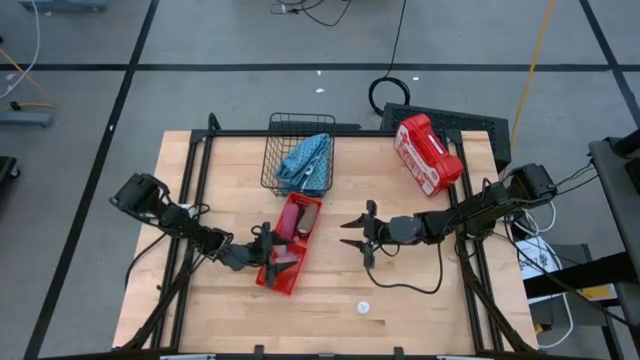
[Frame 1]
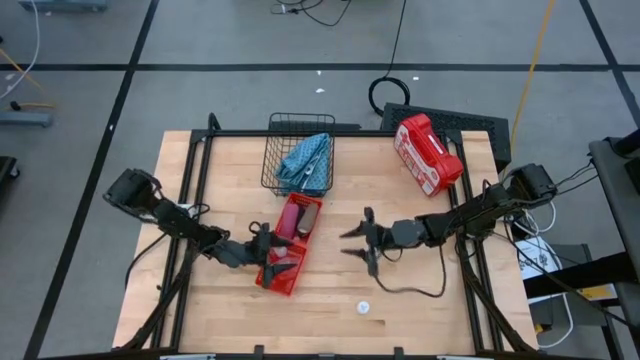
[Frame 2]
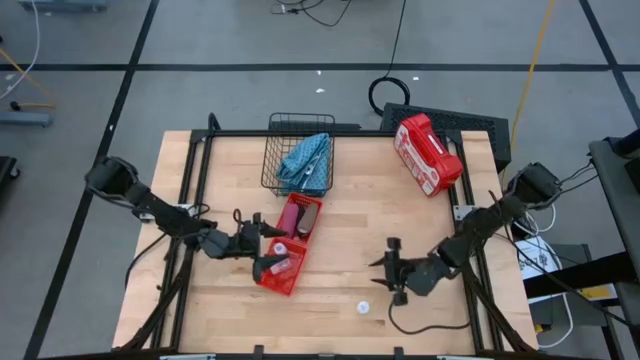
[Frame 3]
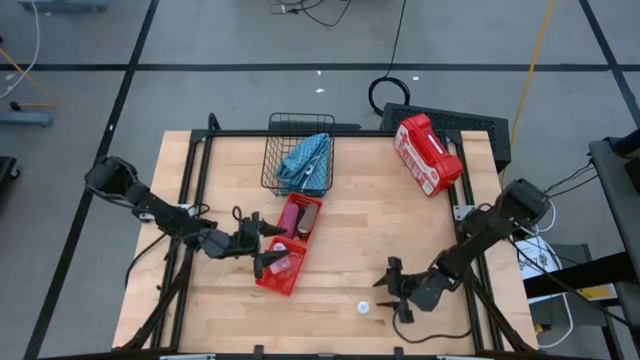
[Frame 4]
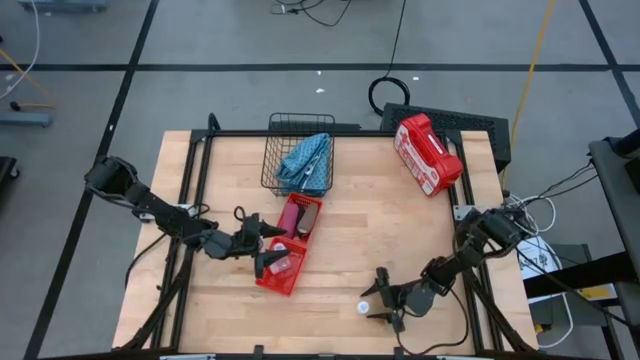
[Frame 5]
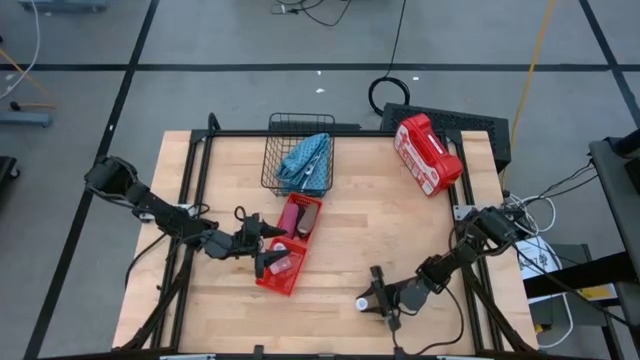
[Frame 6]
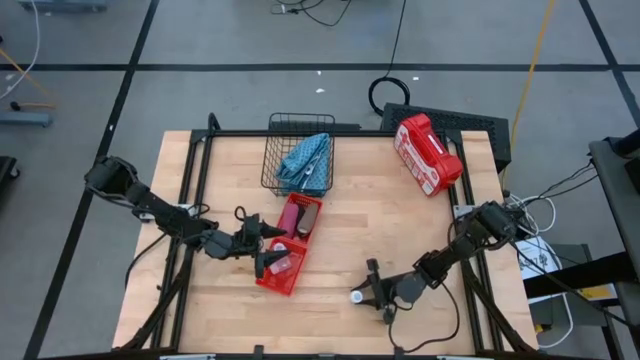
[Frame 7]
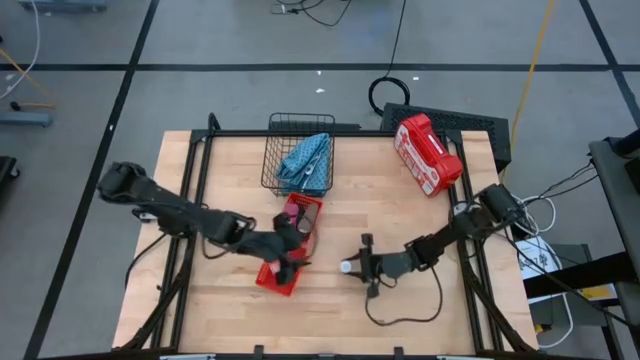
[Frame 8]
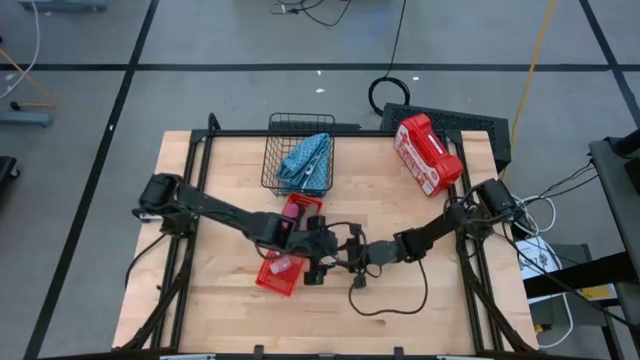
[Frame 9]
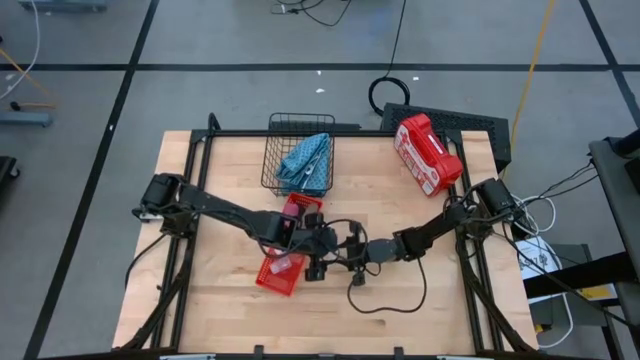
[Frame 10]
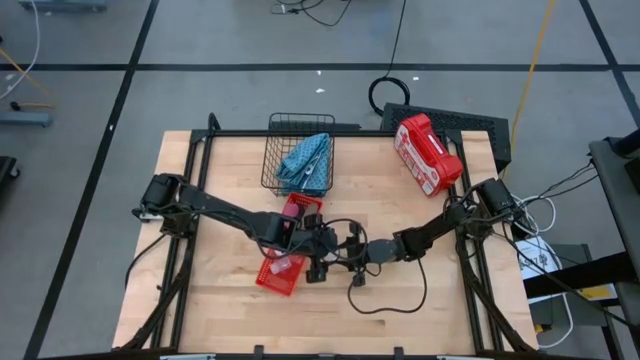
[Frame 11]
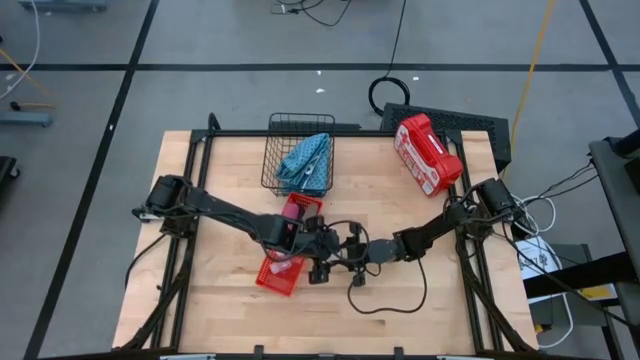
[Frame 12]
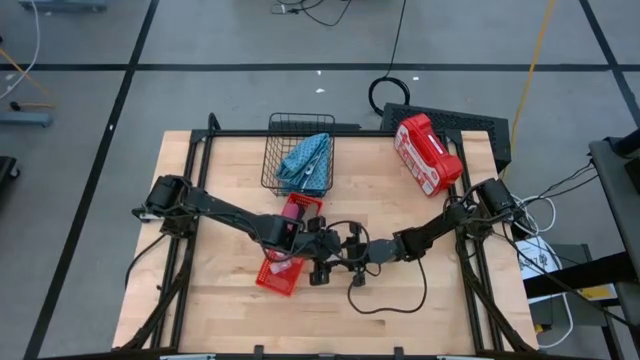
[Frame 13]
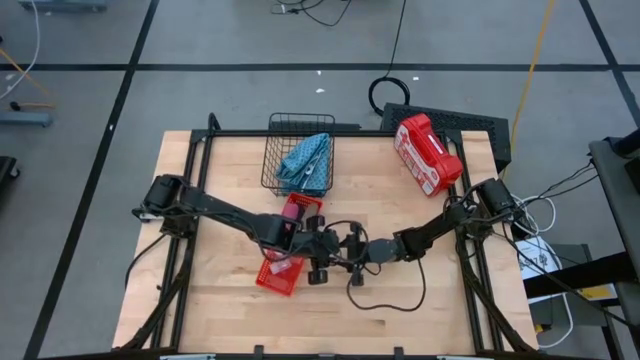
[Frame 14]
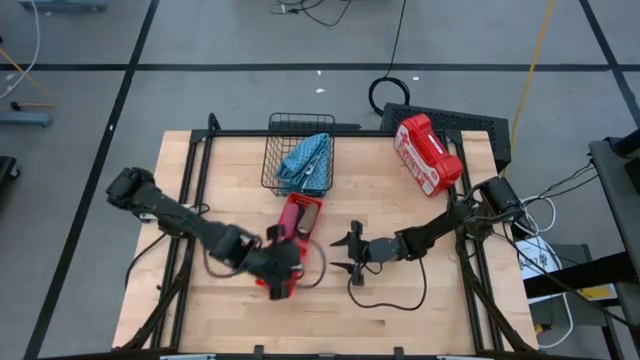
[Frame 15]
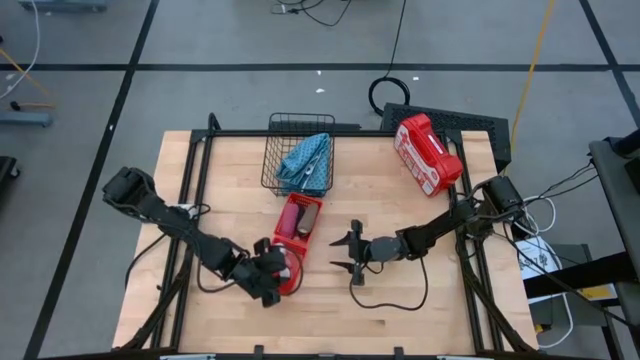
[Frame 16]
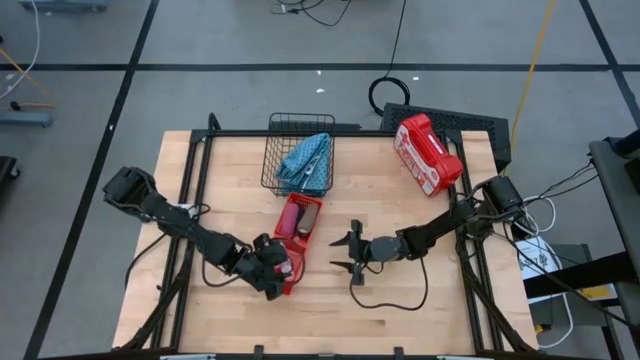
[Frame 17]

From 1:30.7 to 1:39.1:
Task: Pick & place medical supplies in basket/bin
Put the white pill bottle into the bottom red bin

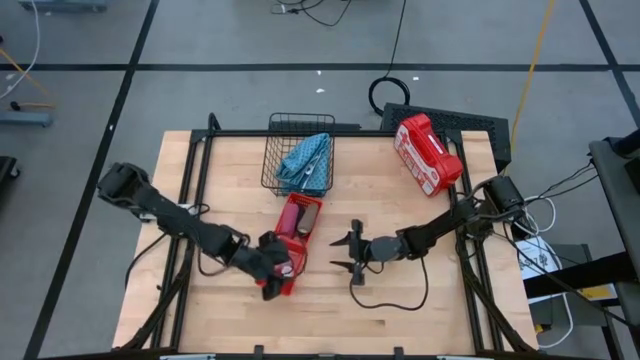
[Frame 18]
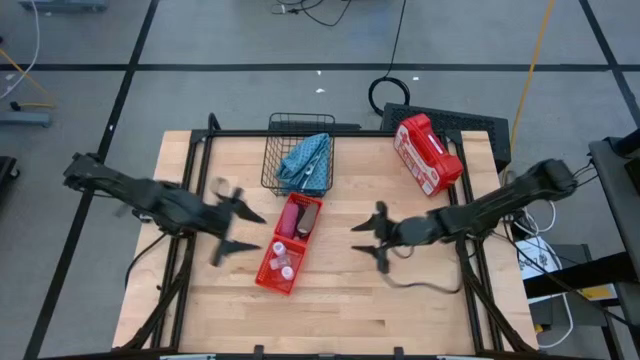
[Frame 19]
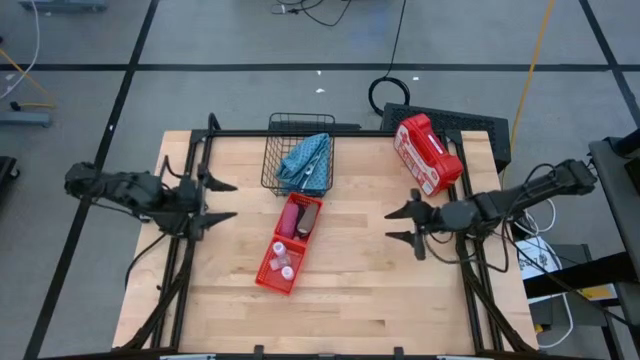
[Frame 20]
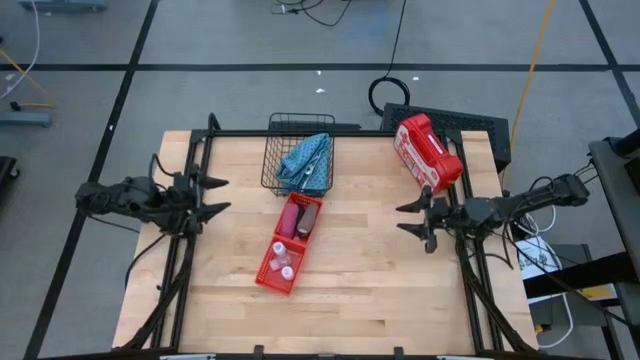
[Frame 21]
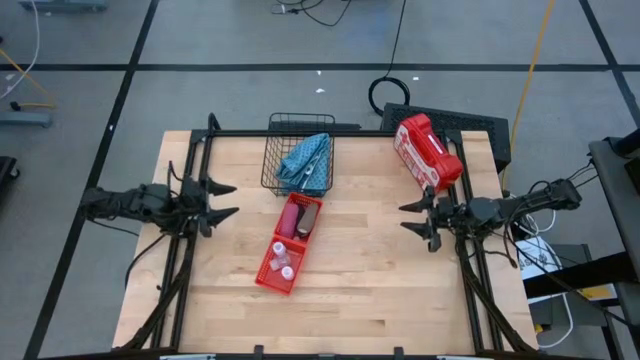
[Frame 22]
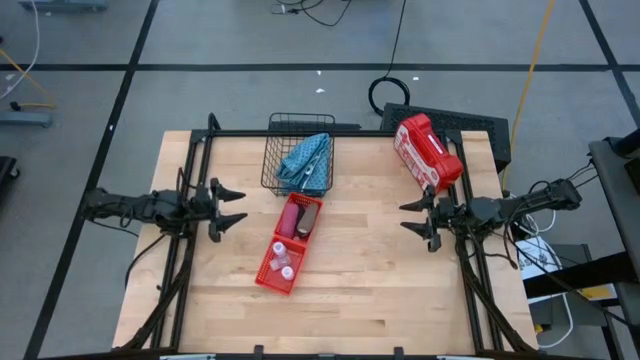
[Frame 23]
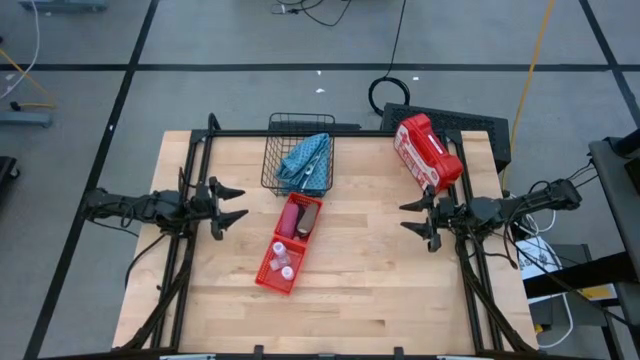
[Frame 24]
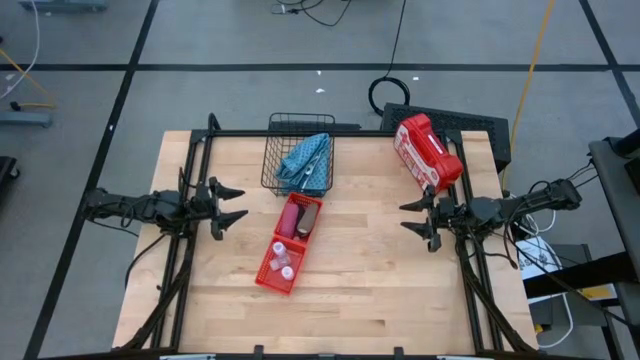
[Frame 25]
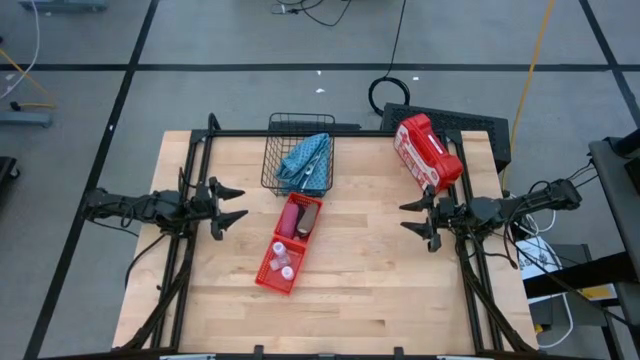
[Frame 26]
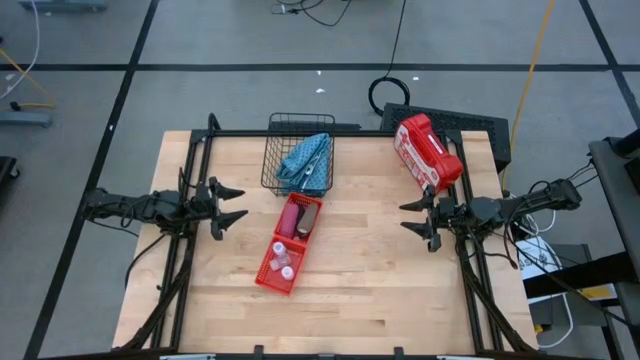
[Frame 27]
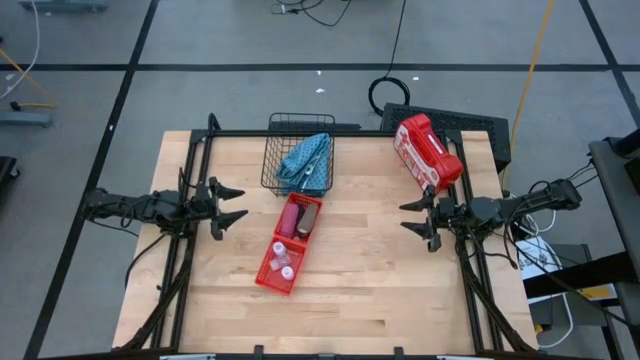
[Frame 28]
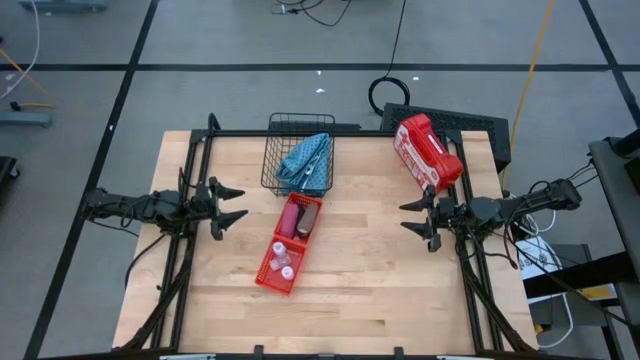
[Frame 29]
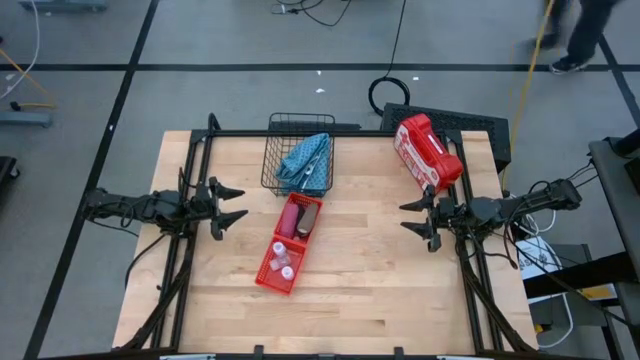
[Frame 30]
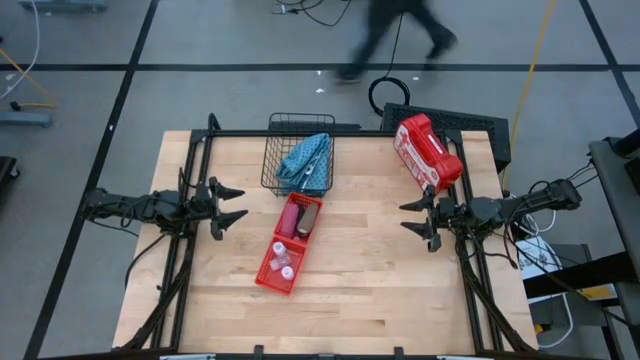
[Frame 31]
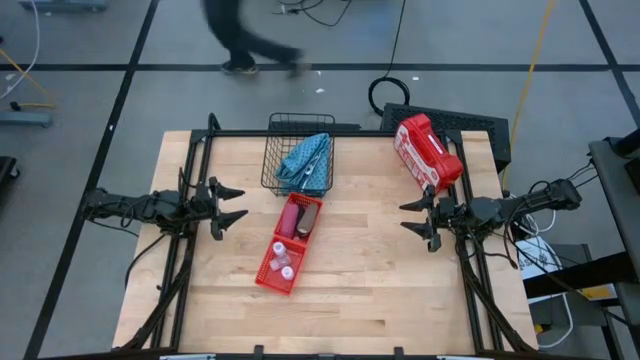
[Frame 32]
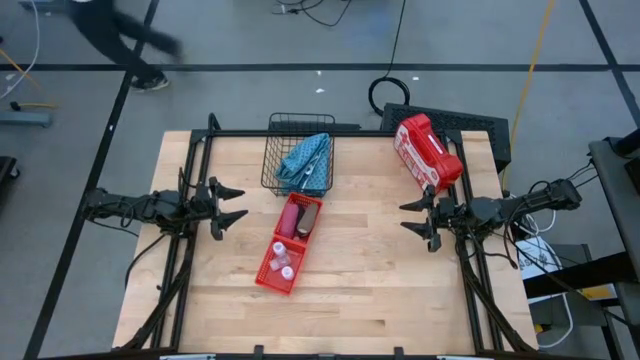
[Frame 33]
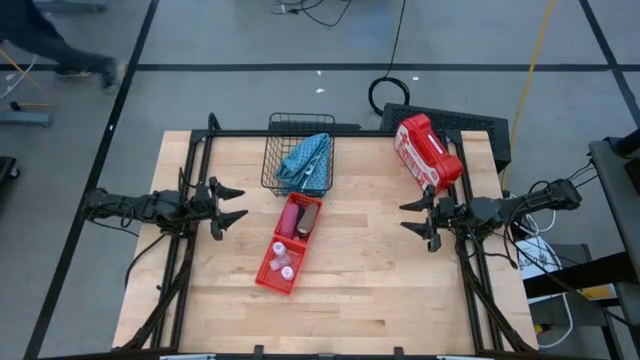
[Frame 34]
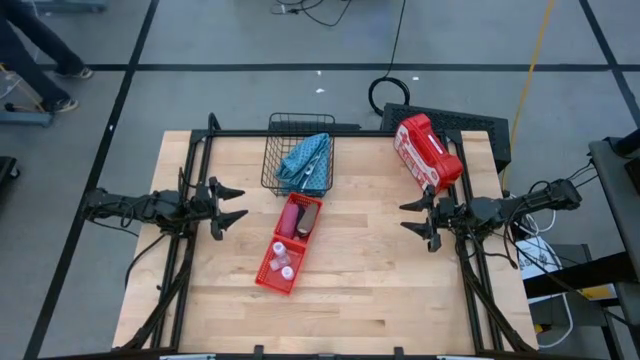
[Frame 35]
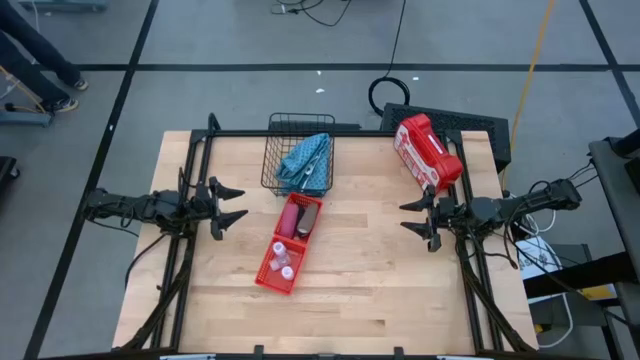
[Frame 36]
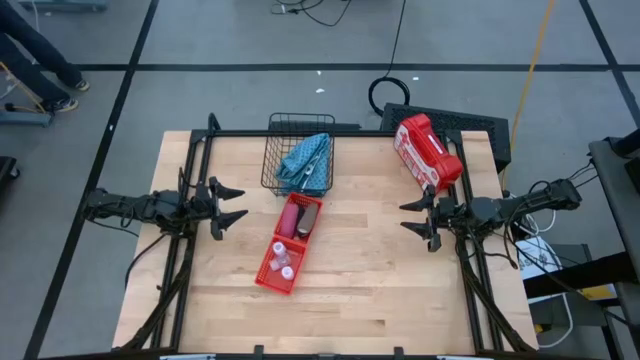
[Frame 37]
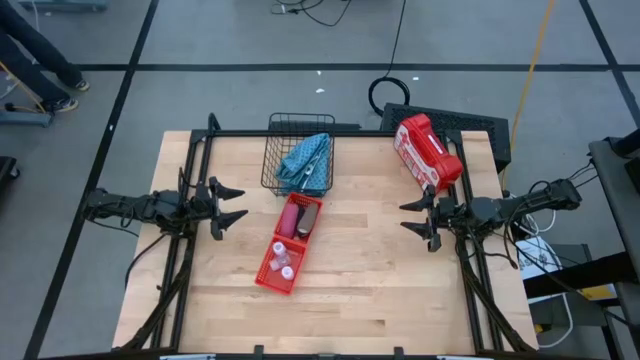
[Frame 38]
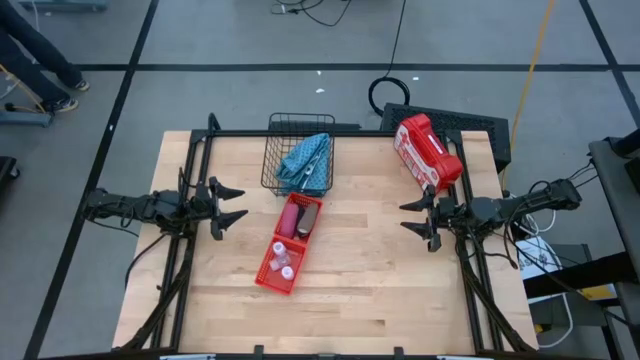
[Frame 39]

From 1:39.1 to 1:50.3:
Return to Home Position

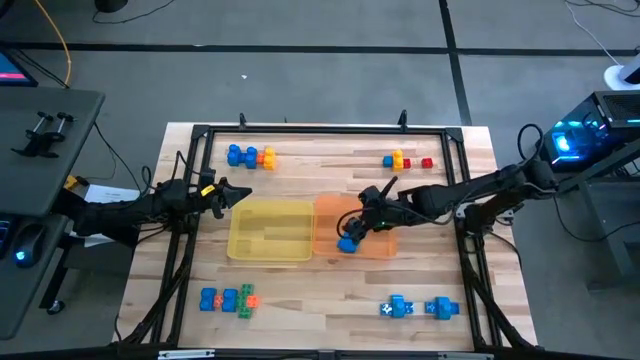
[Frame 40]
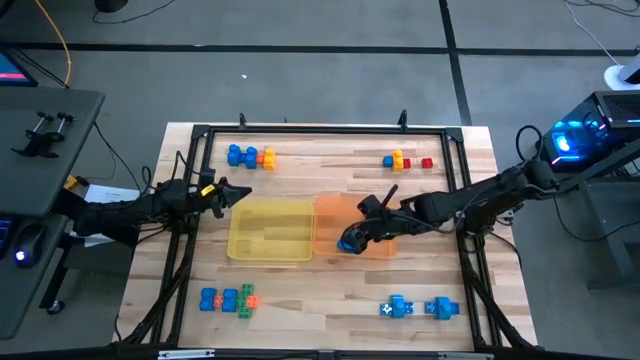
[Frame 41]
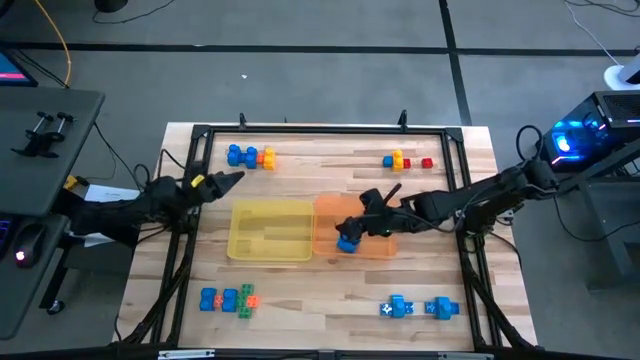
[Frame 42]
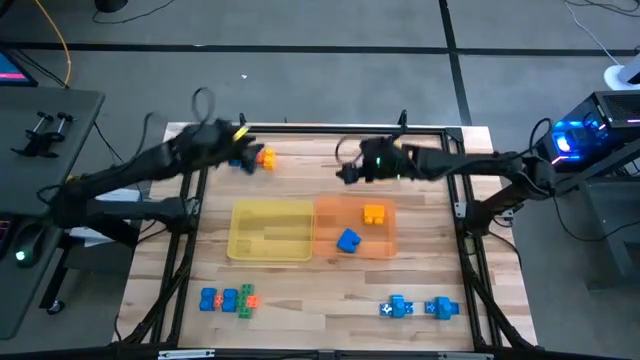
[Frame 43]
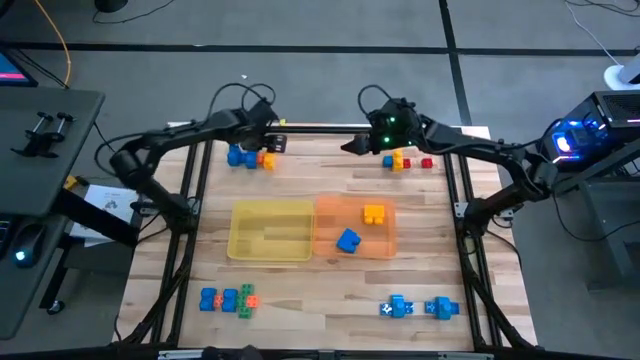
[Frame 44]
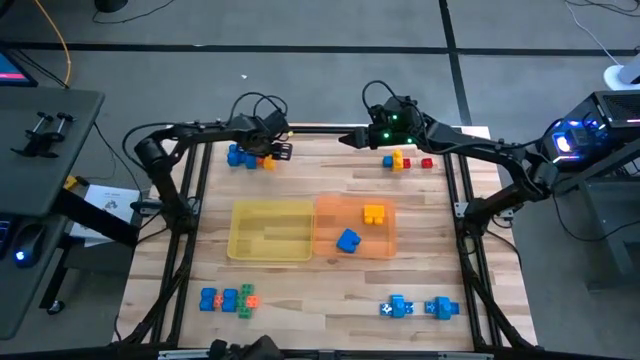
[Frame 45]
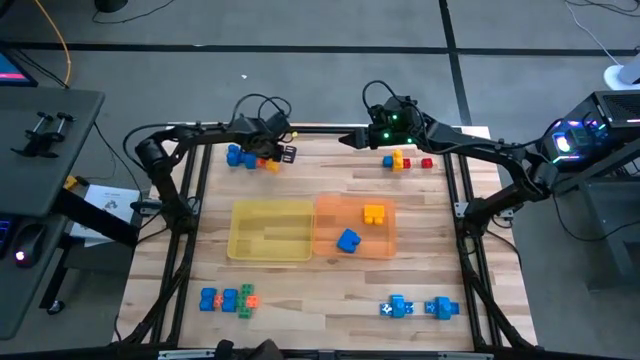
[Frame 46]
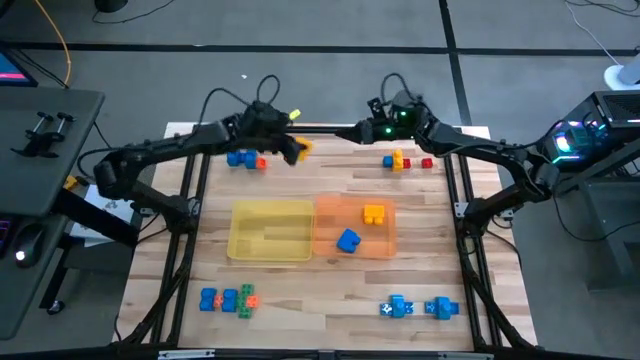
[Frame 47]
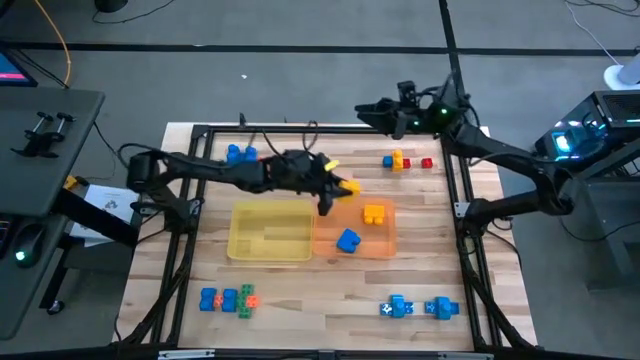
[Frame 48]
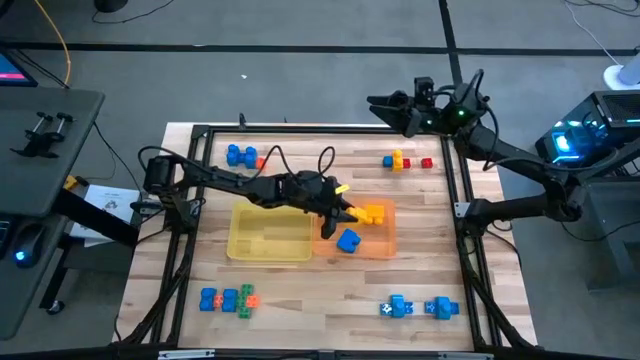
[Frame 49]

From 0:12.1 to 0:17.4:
Task: Sort blocks by size
Put the left large yellow game piece into the orange bin
